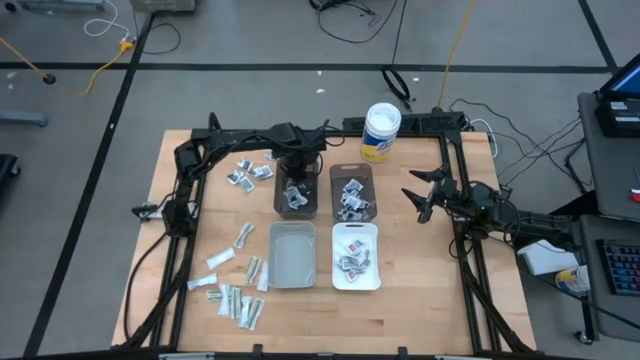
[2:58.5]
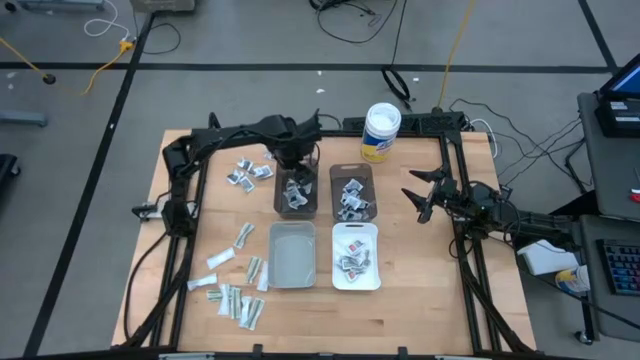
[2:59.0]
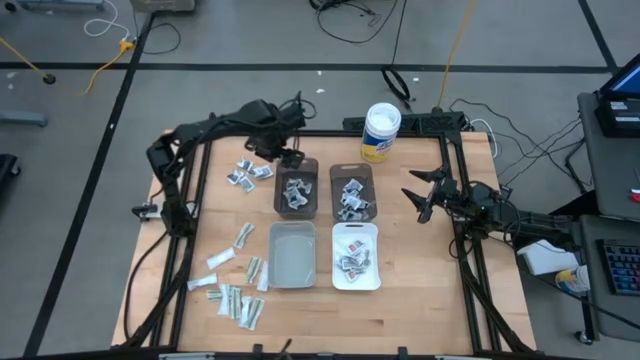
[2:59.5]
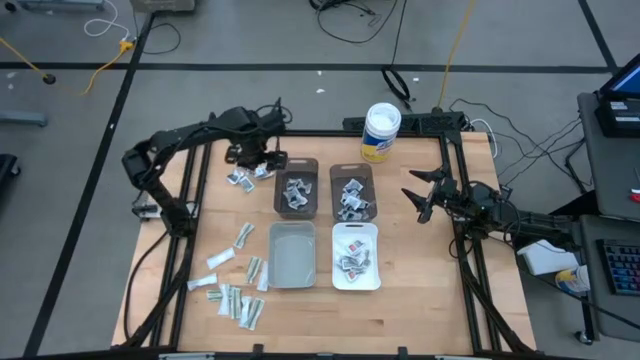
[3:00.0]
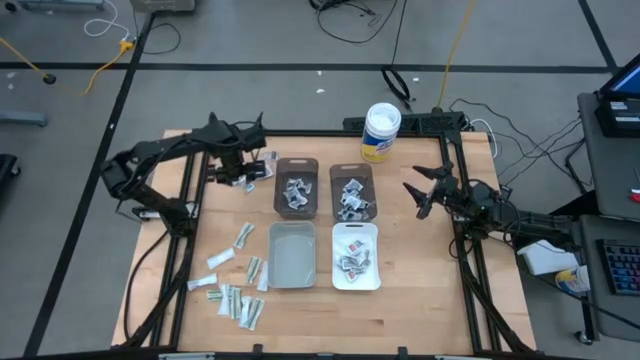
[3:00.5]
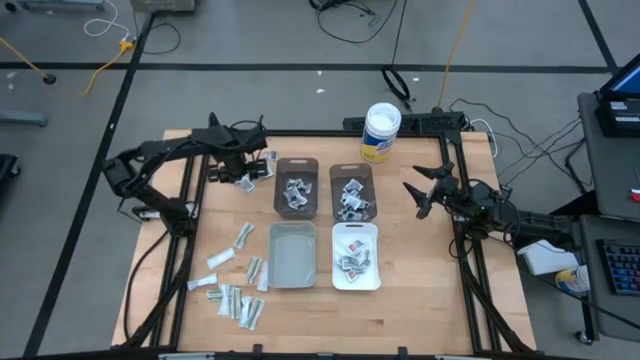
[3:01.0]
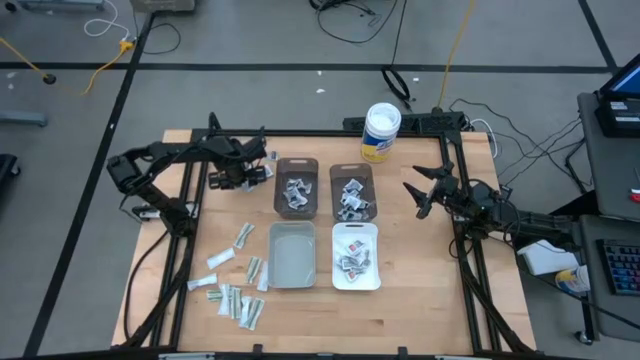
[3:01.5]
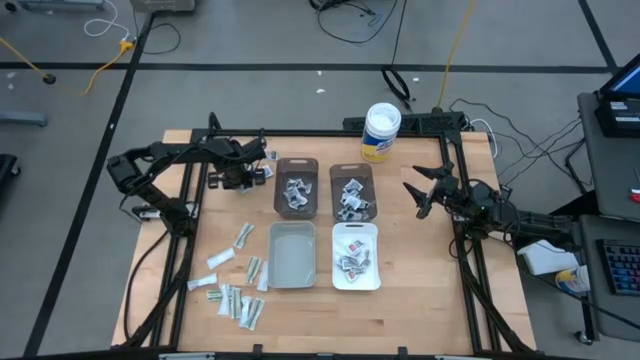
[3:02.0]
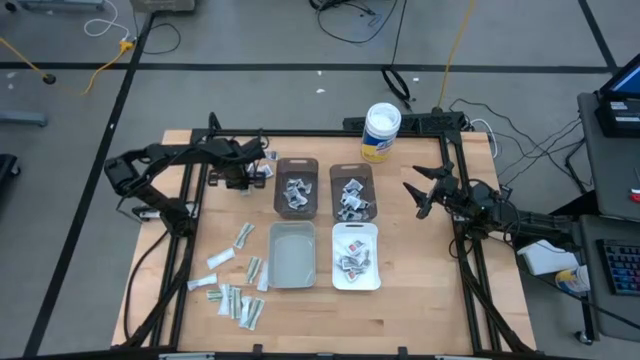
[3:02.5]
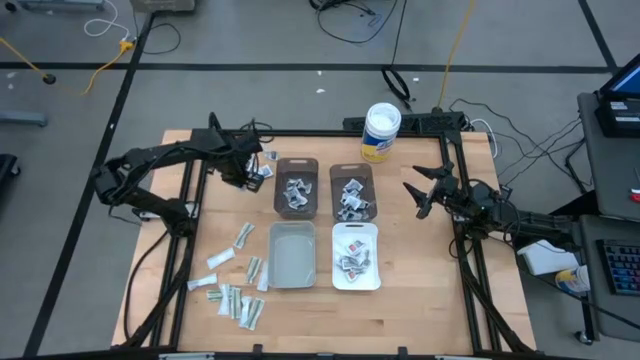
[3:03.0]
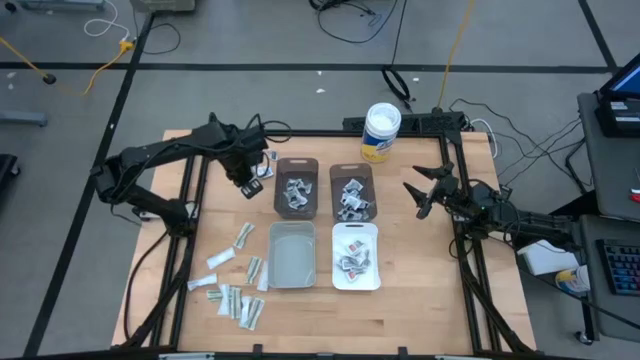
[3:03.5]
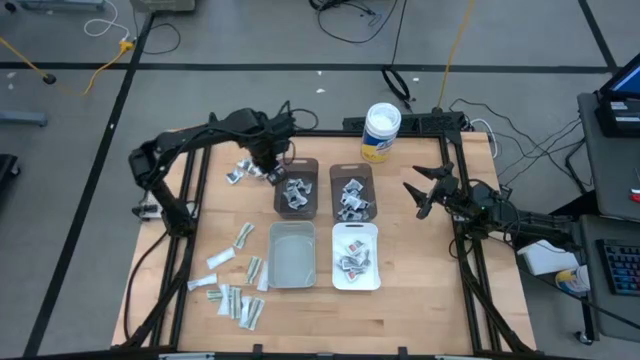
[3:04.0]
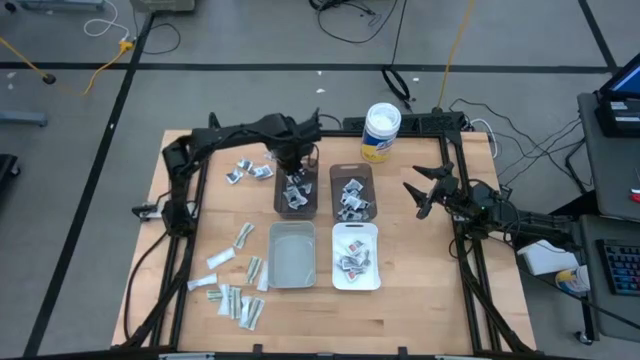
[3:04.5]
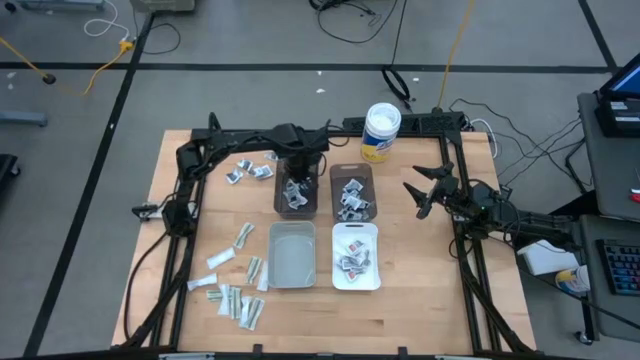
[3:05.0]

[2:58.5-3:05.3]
Task: Pick & Place First Aid Supplies
Put the gray pad into the left black bin

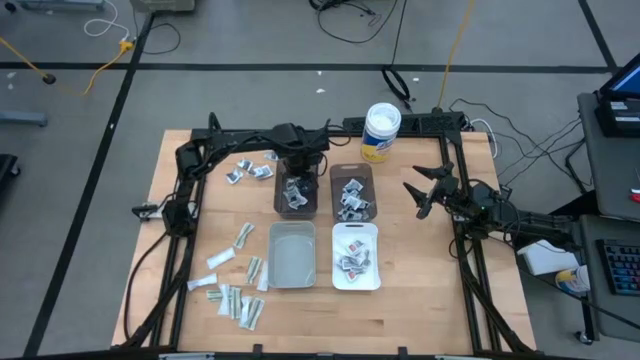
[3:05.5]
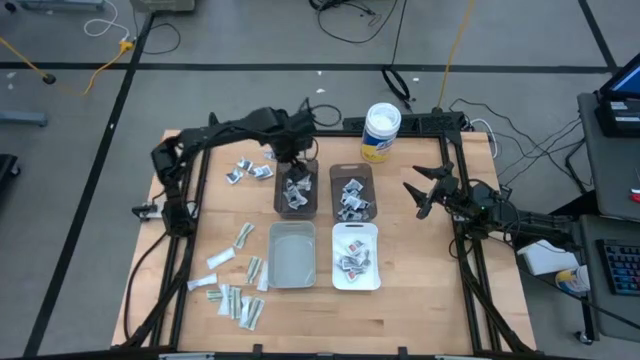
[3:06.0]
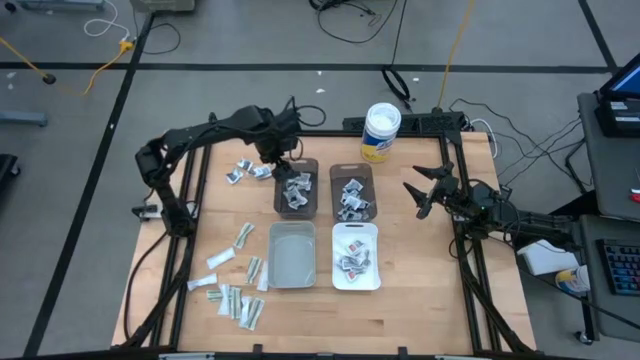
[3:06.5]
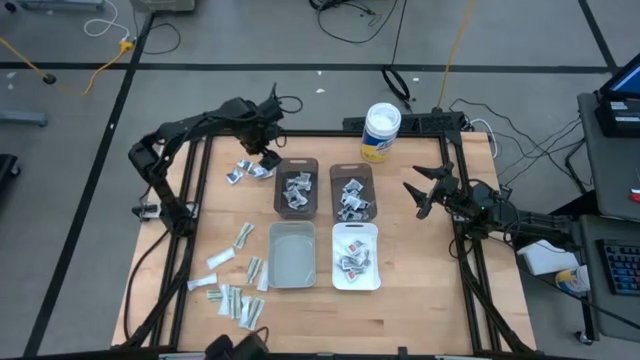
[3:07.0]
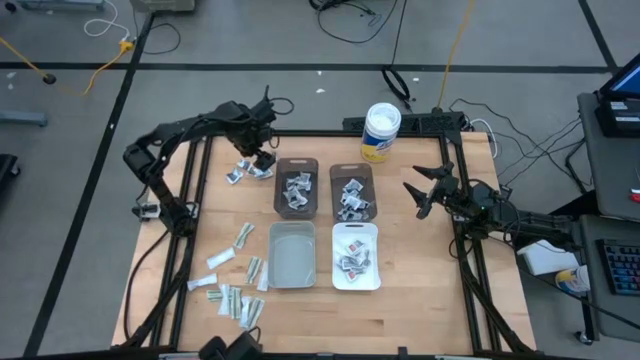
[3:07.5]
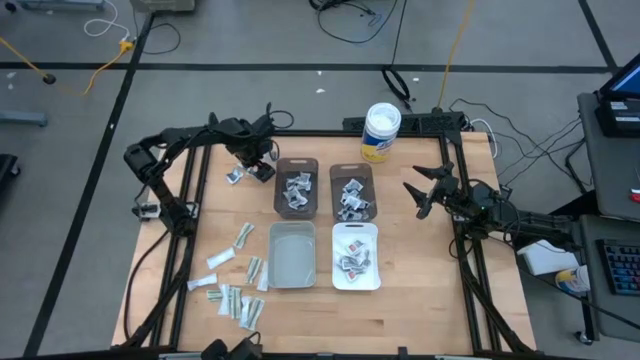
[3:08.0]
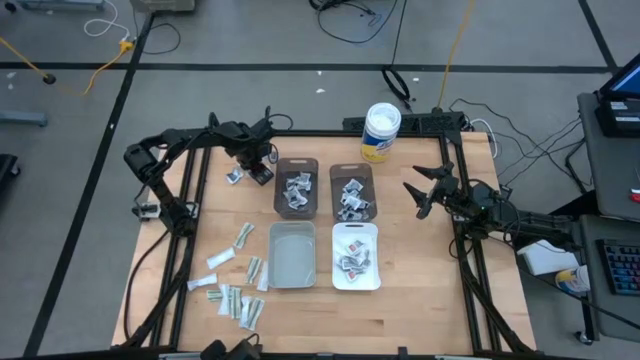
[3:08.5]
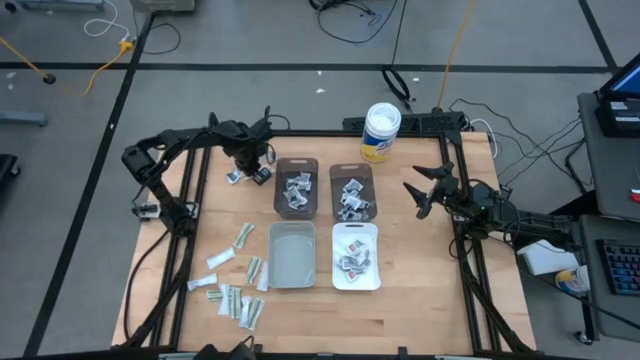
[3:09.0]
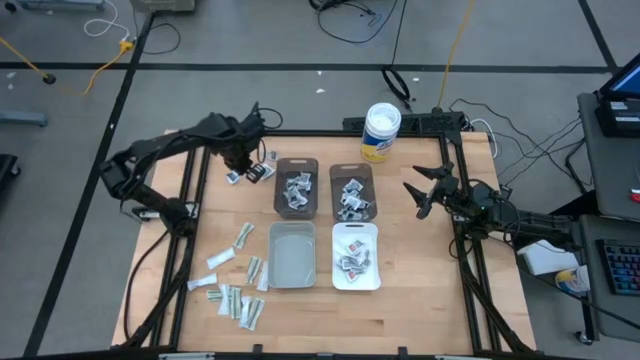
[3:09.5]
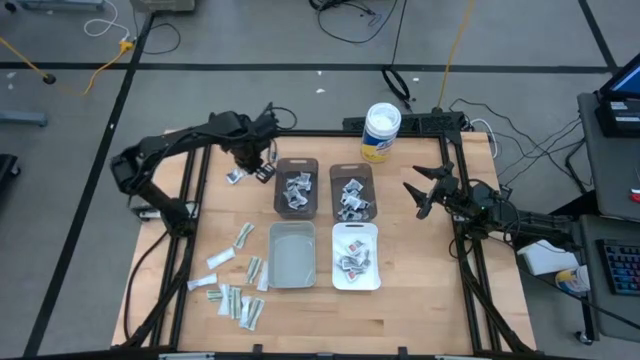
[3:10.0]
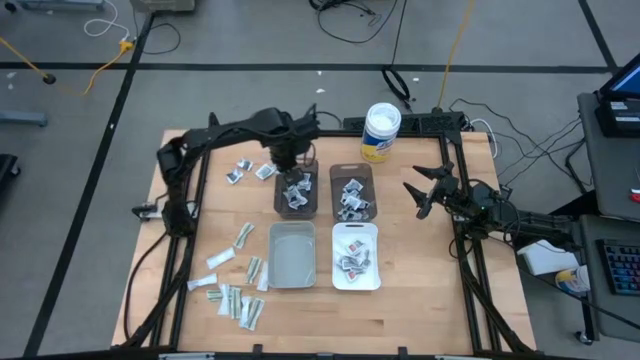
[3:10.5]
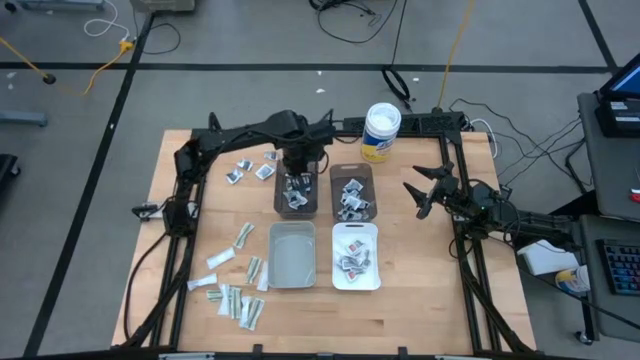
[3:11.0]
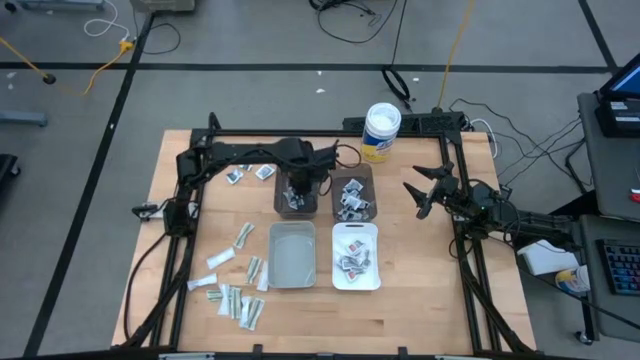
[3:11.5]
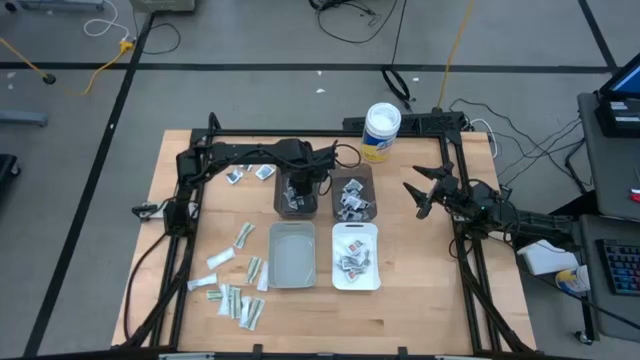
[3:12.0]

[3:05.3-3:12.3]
Put the gray pad into the left black bin

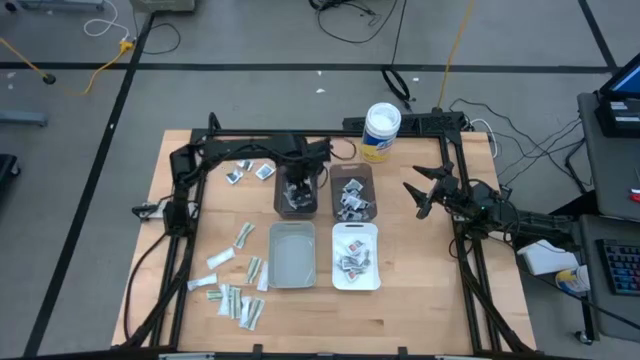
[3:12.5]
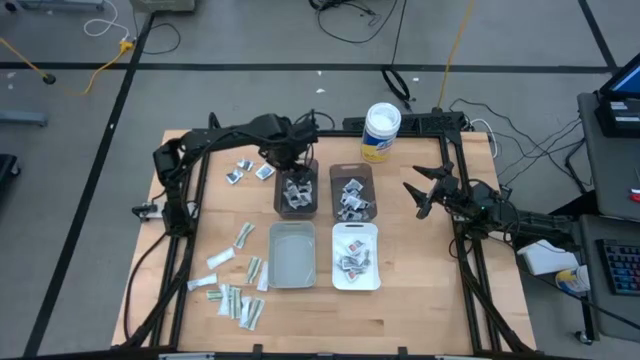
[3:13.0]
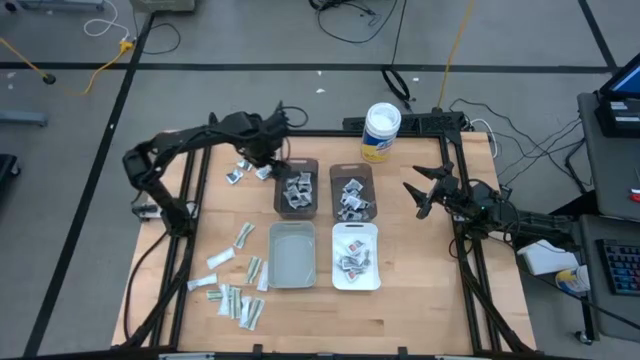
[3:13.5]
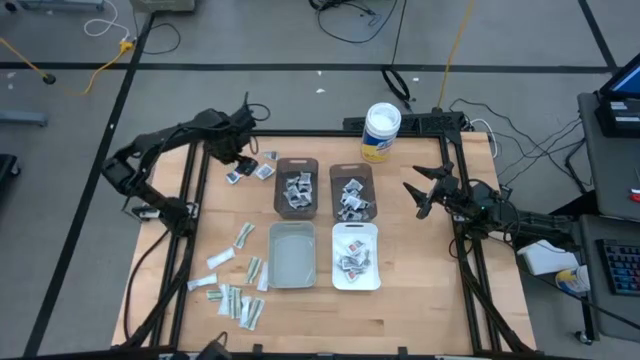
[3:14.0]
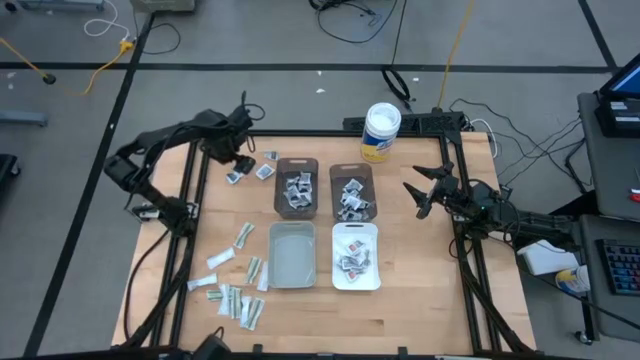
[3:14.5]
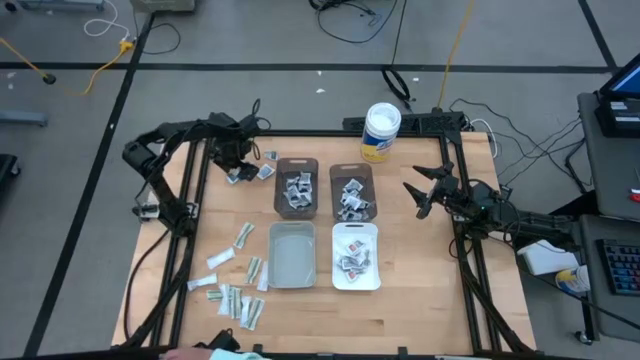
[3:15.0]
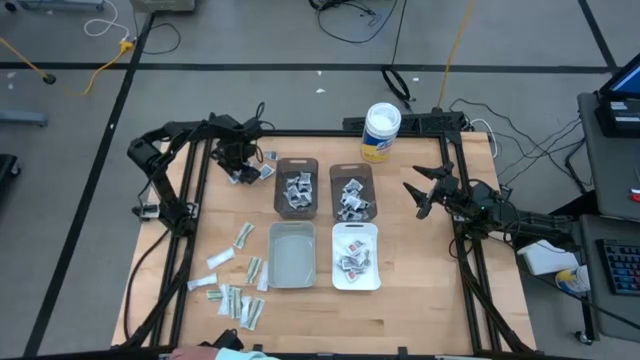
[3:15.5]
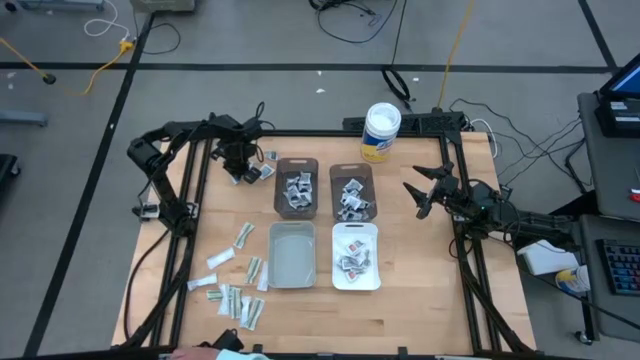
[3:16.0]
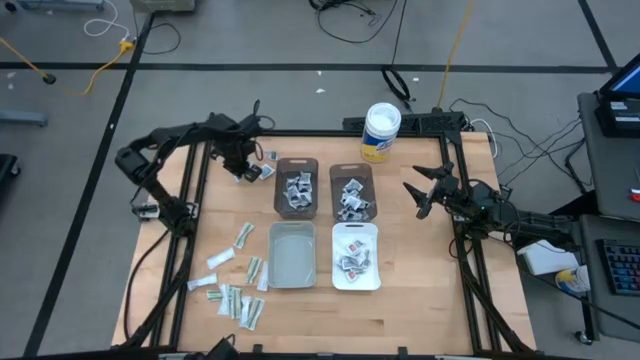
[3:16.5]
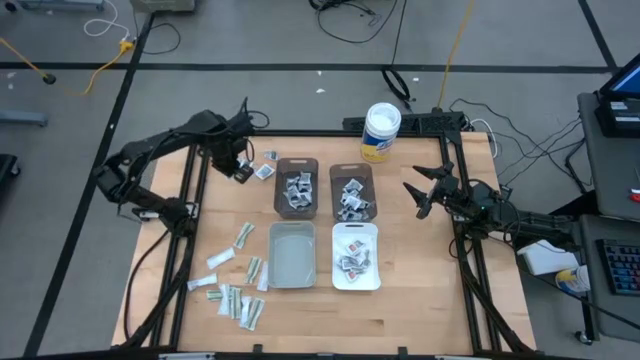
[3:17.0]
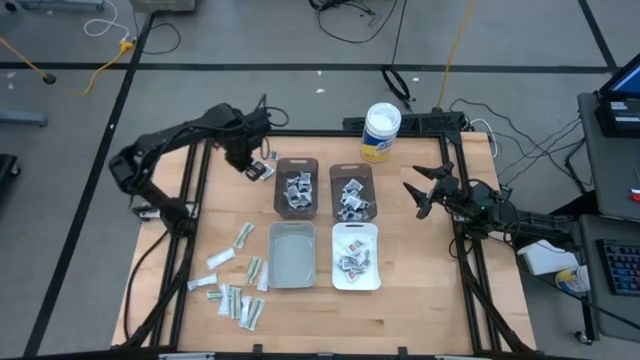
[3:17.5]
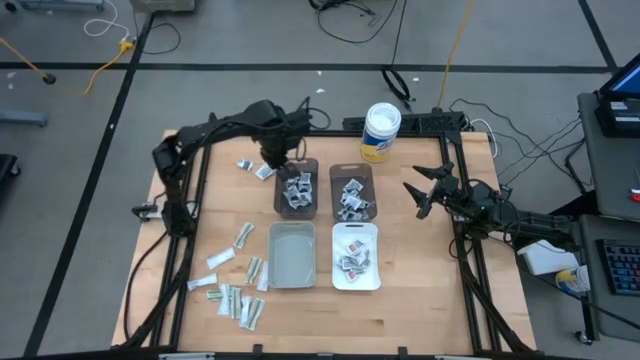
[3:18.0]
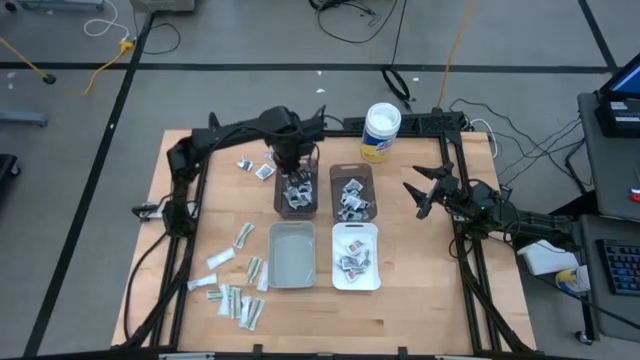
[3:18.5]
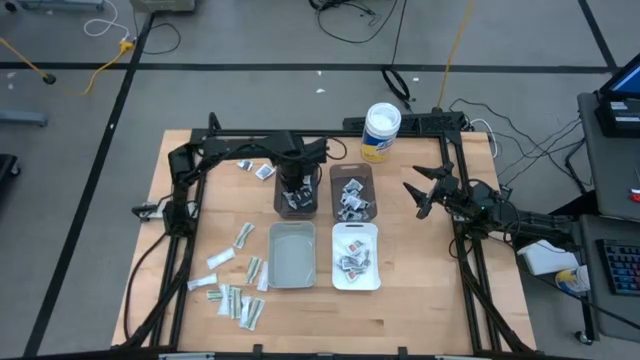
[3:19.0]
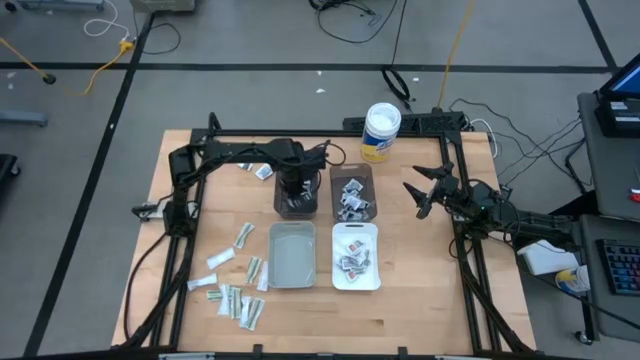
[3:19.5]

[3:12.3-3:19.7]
Put the gray pad into the left black bin
